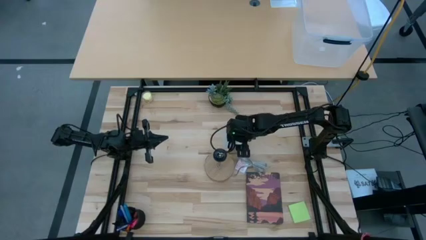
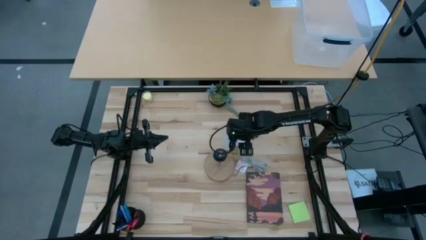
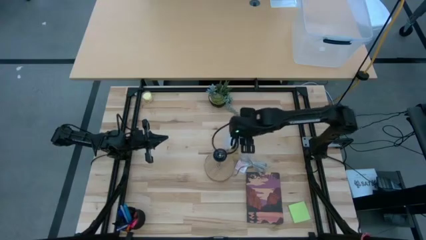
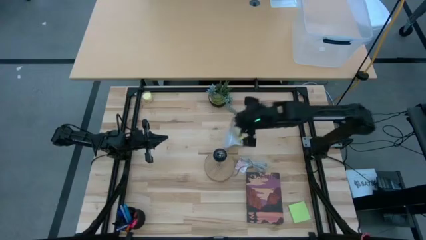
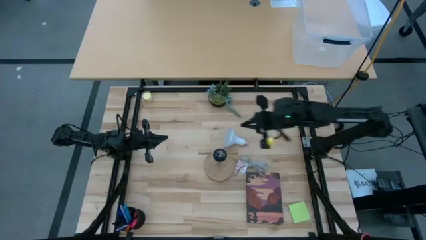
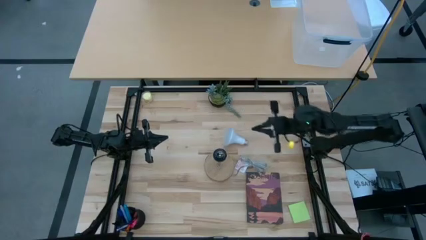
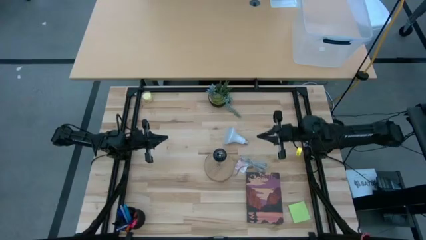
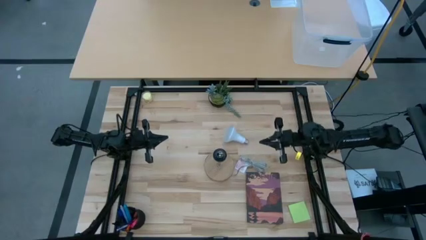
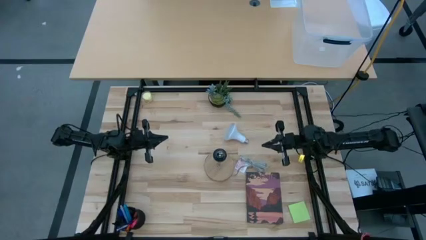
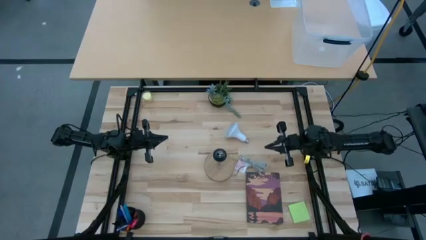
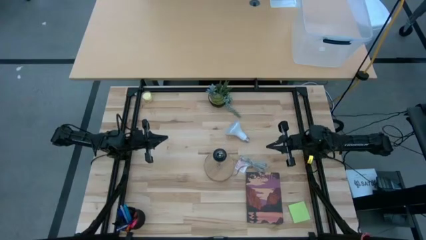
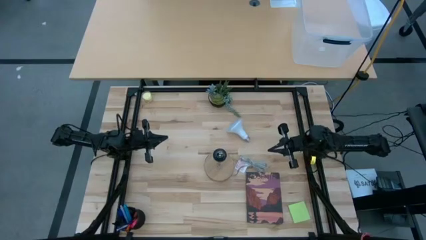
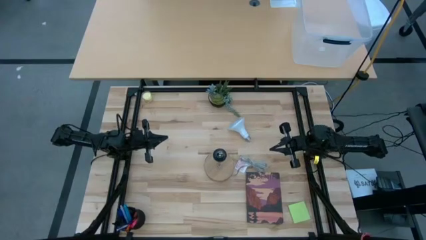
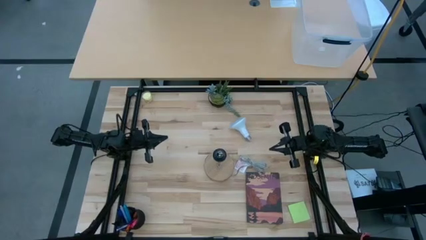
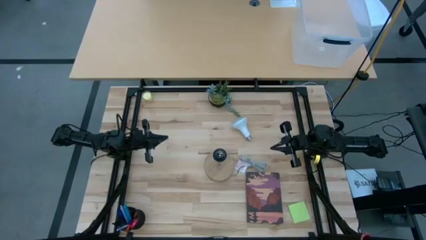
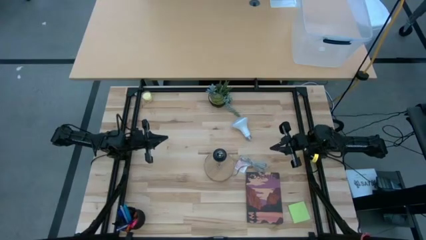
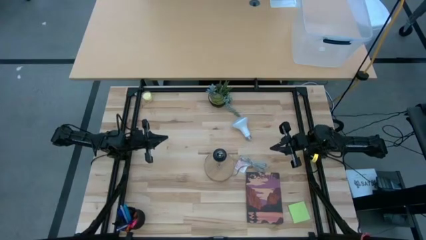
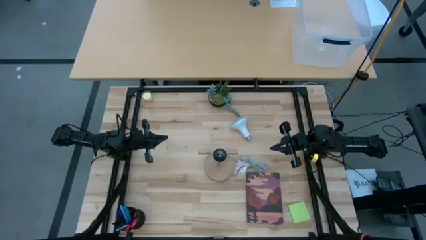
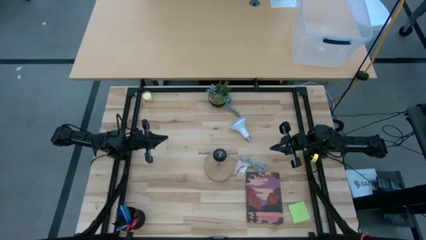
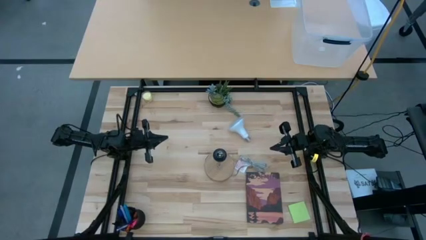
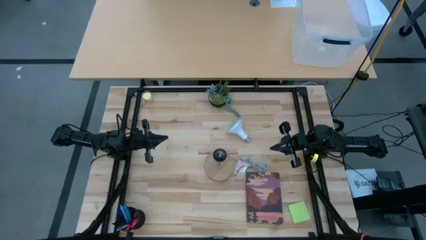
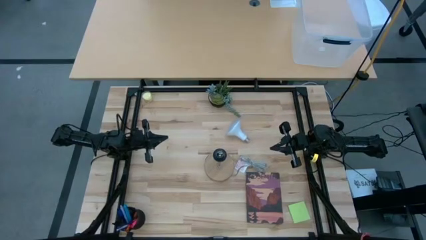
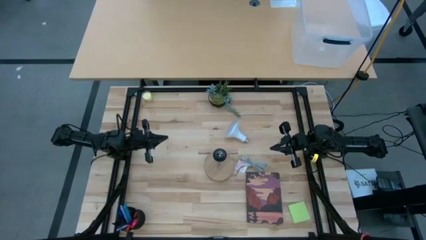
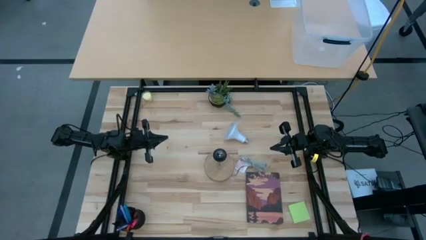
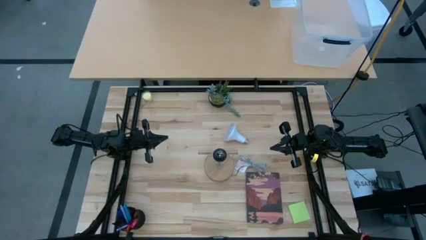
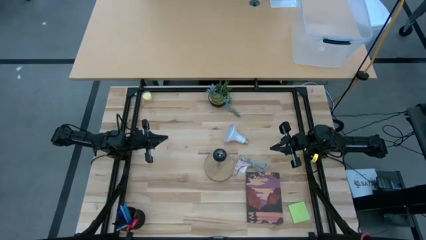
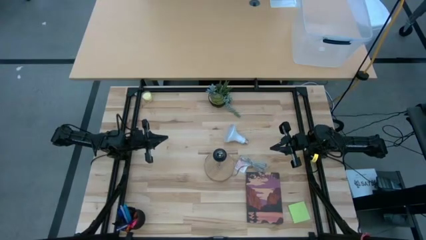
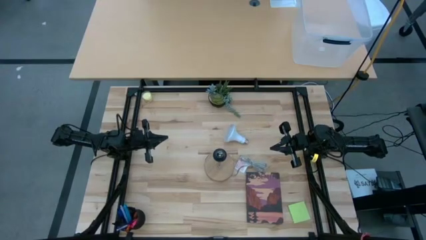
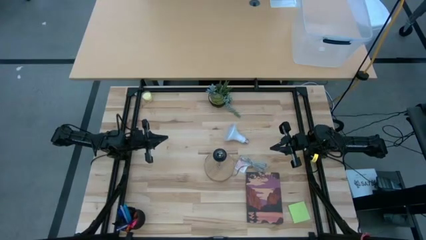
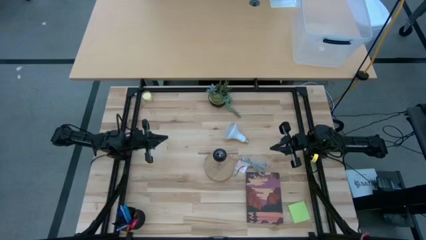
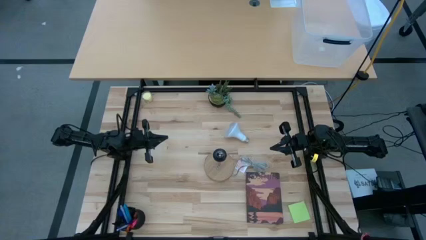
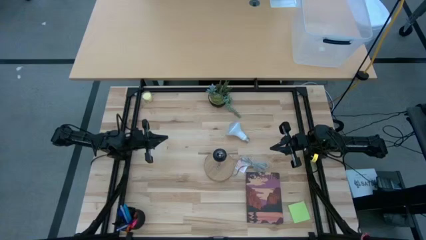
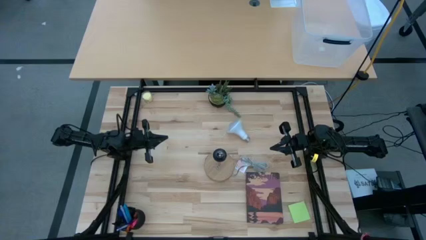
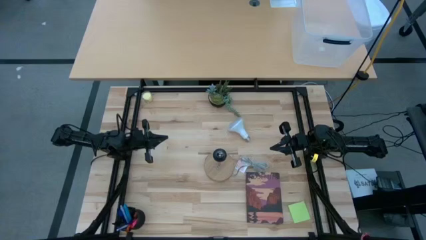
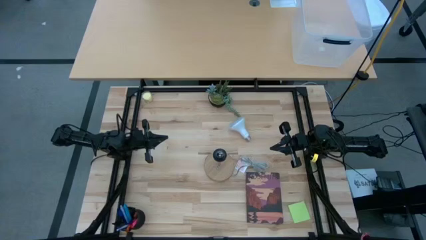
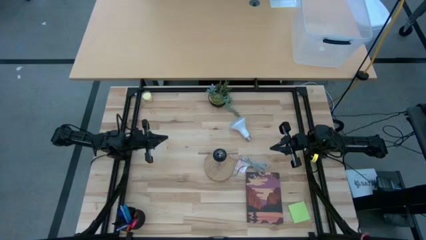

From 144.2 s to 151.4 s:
Task: Screw lightbulb
Return to Home Position

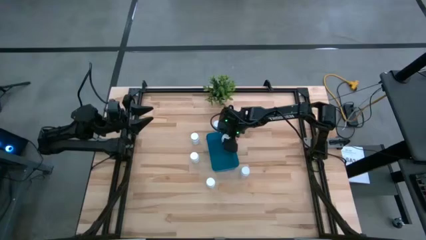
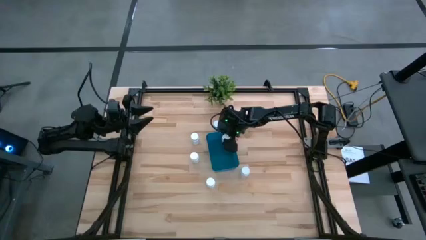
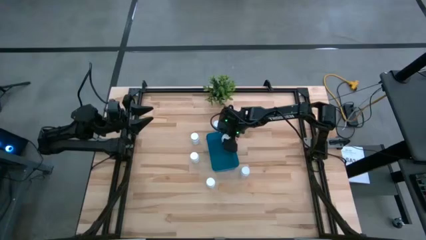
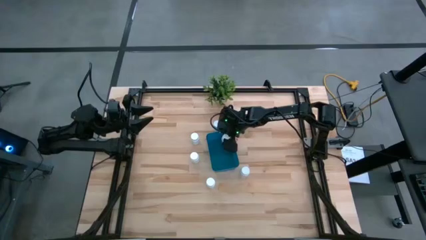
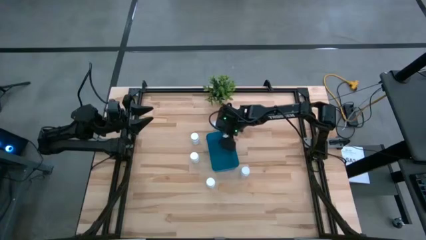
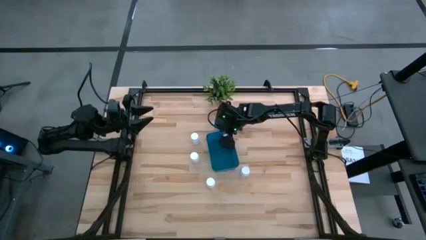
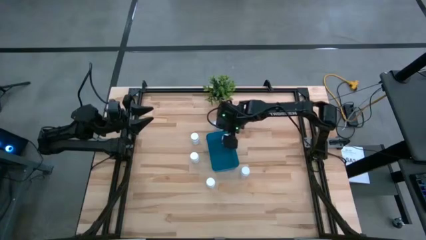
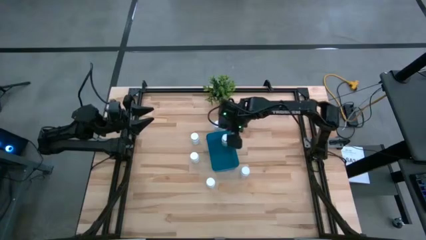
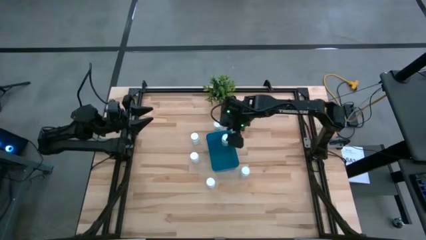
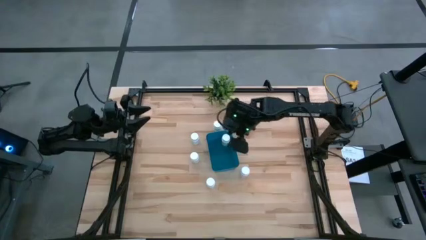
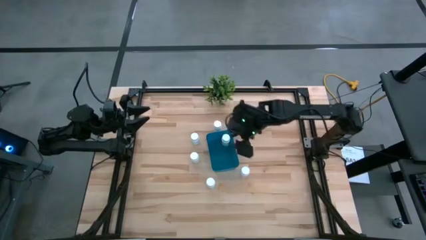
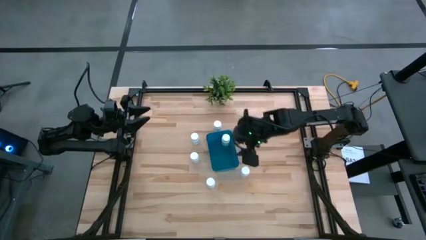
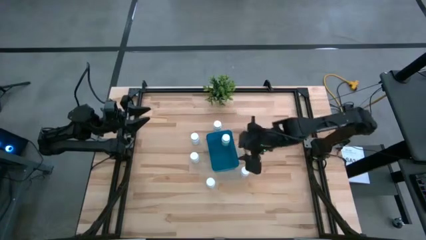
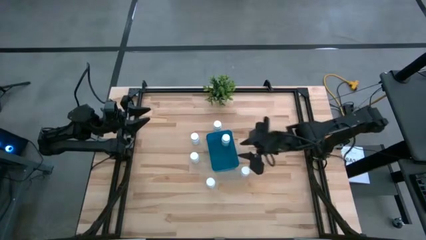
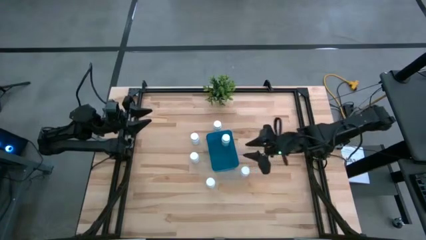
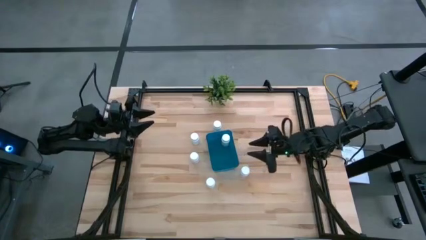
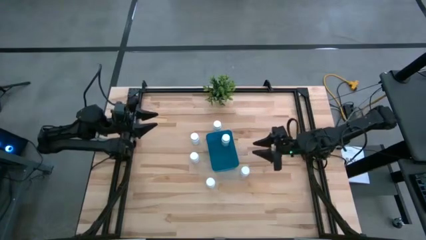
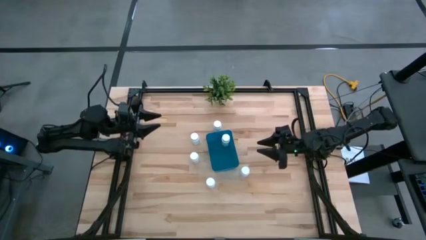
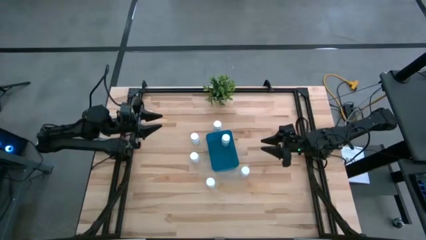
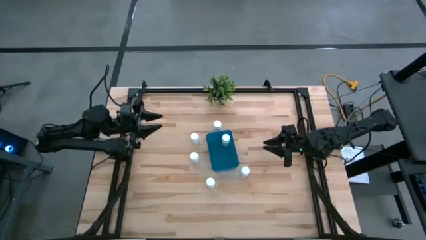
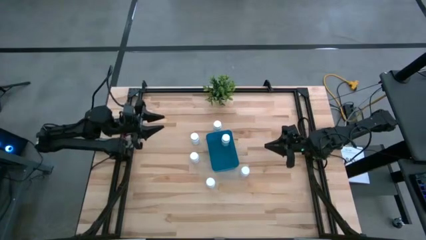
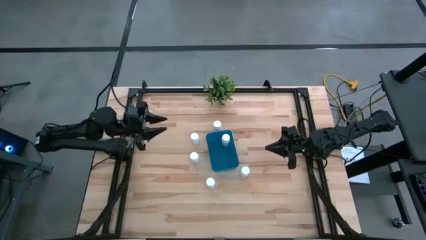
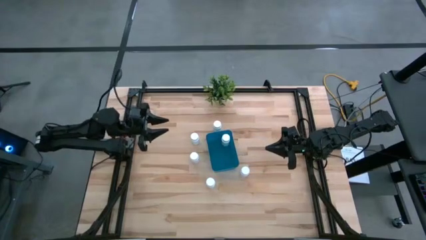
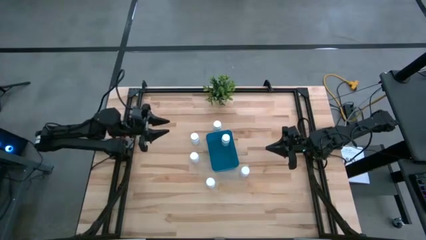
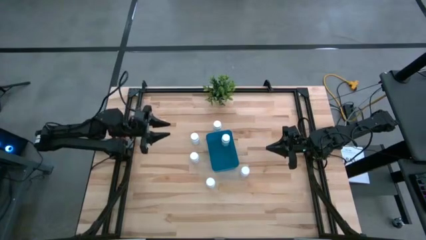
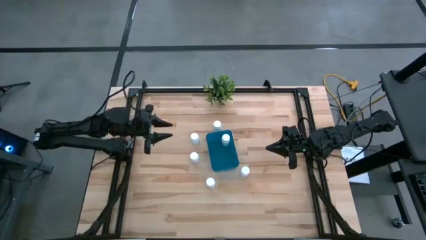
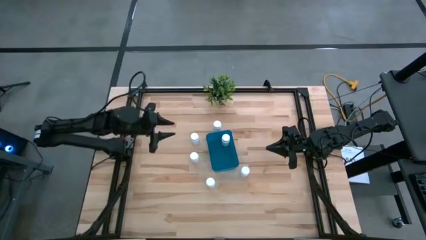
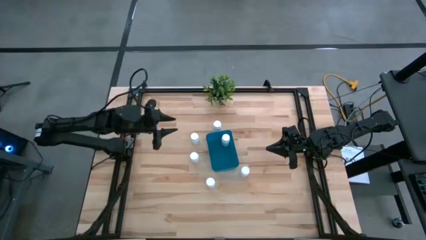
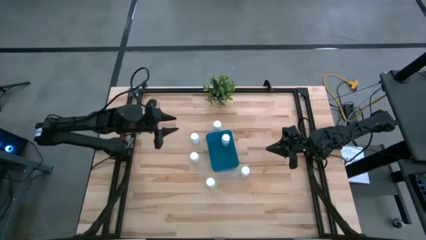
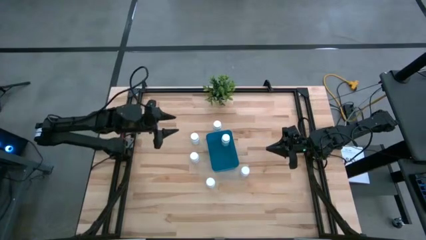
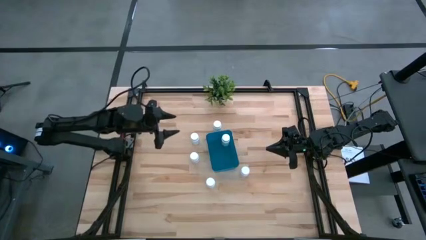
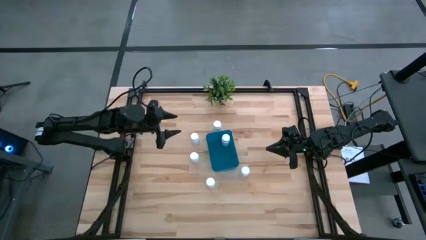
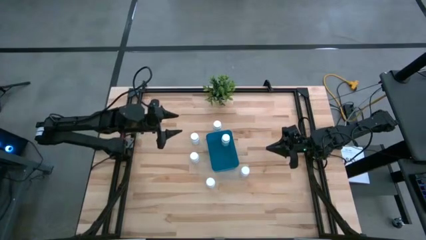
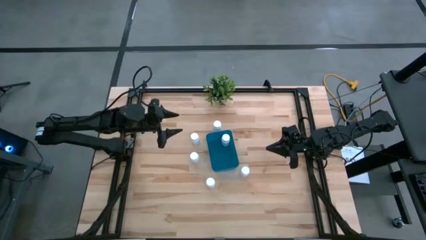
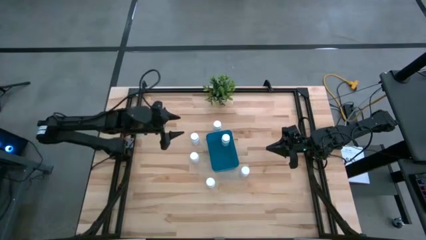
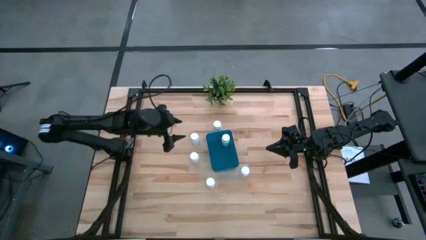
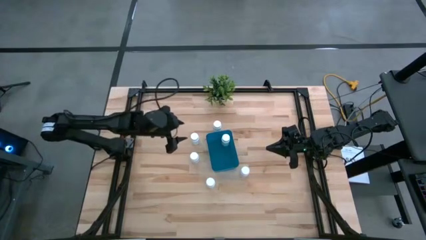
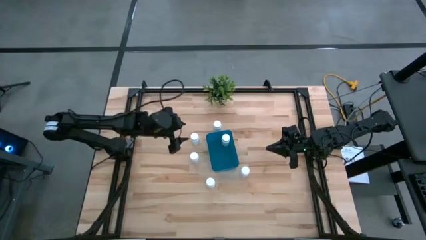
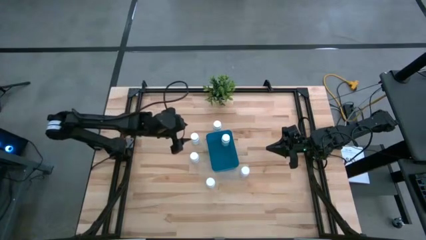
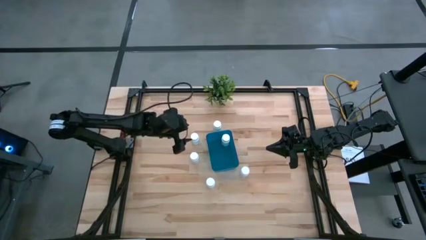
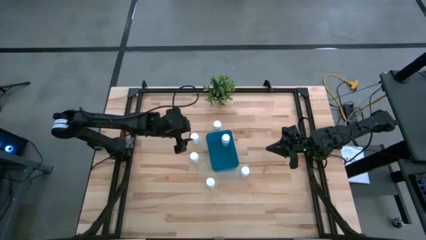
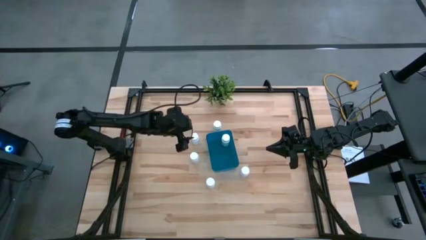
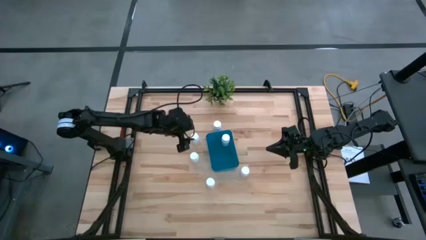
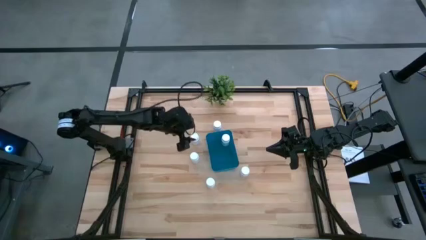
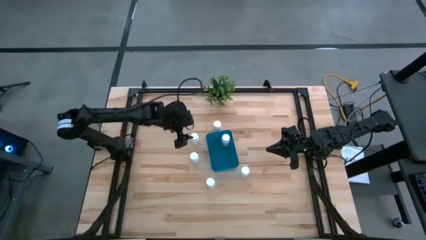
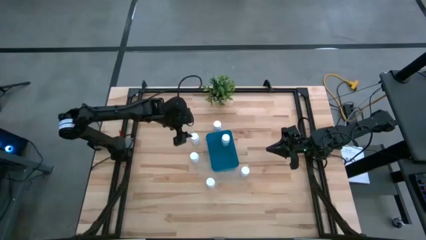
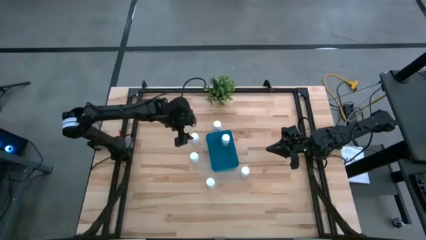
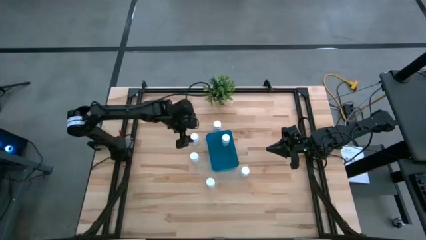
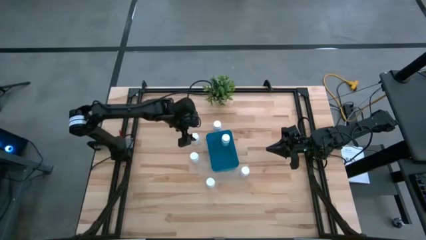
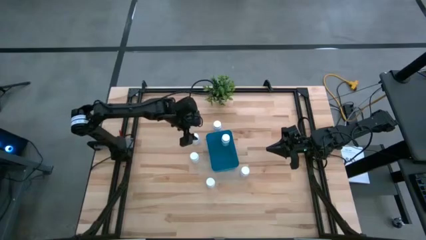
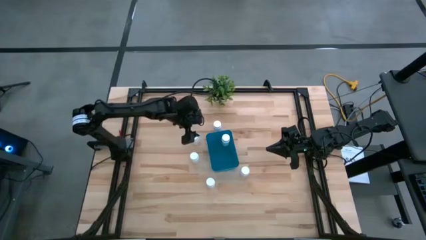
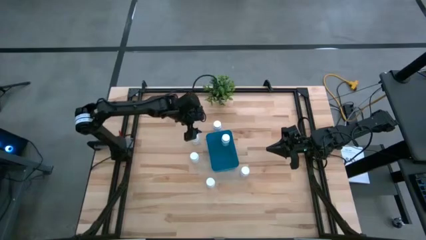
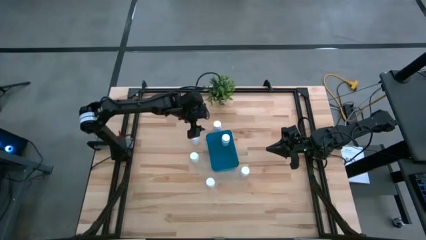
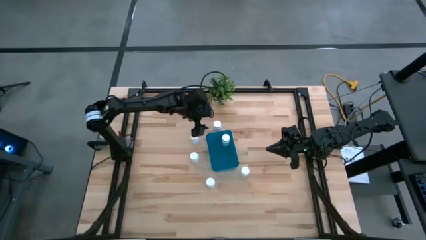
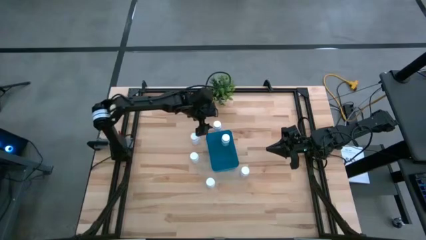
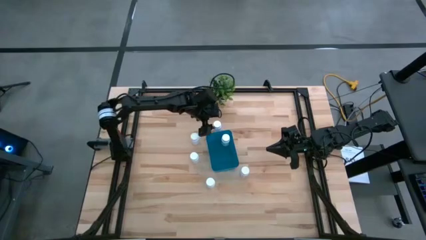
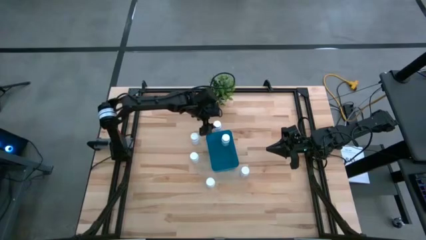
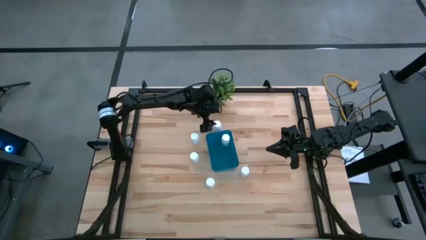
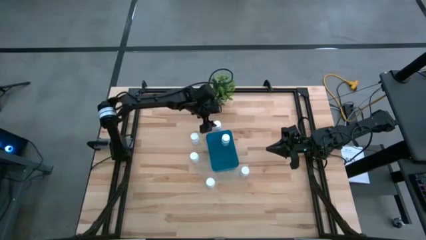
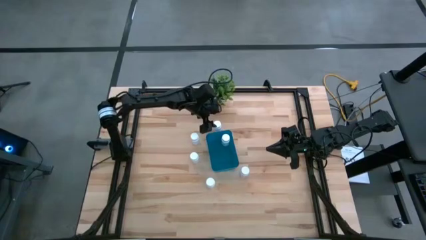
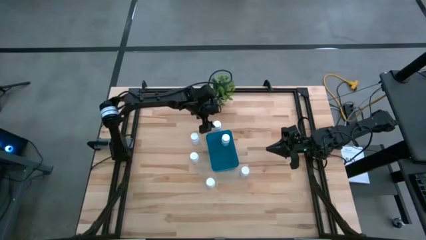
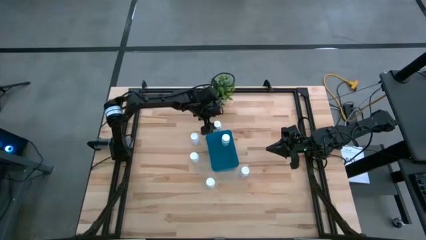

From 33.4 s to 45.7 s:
Task: Pick and place pill bottles into a basket
Put the white medicine bottle into the blue bin
